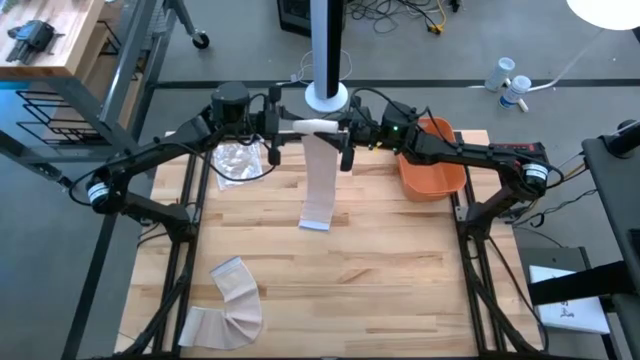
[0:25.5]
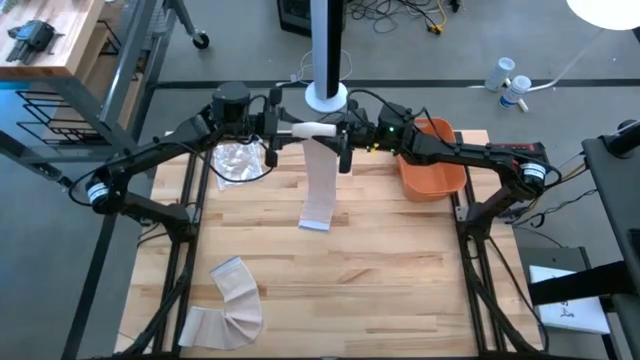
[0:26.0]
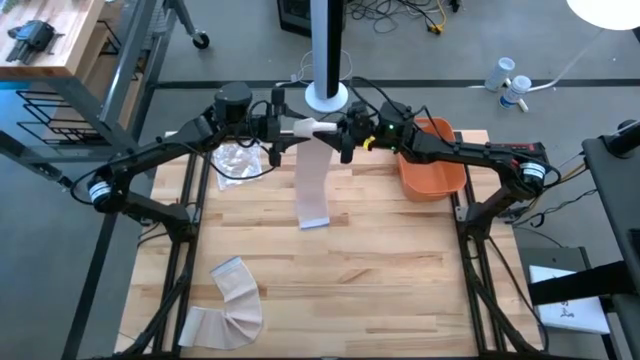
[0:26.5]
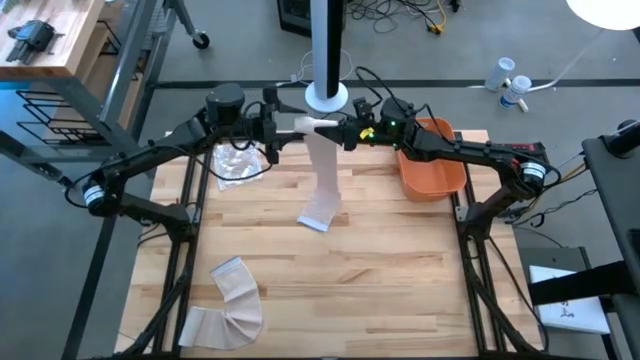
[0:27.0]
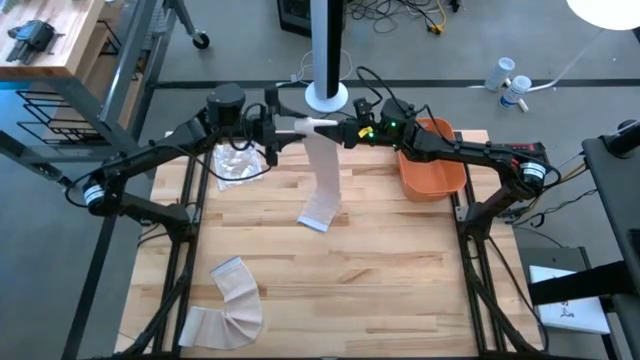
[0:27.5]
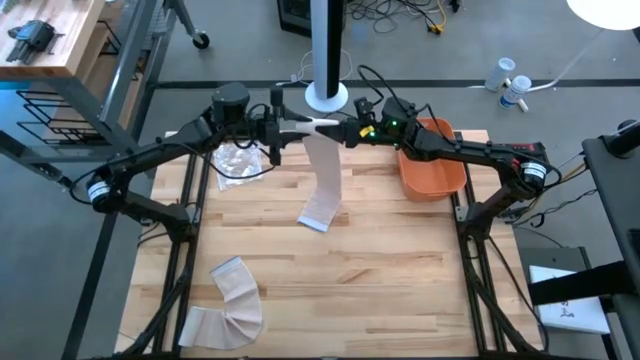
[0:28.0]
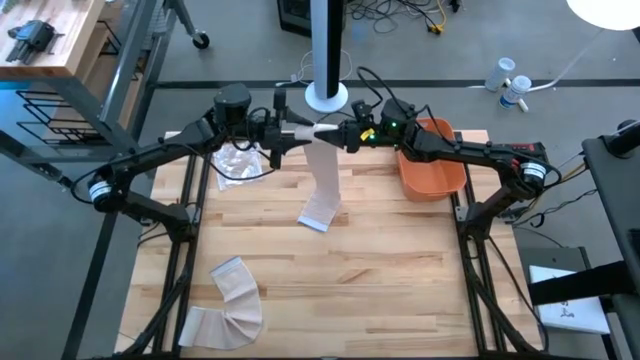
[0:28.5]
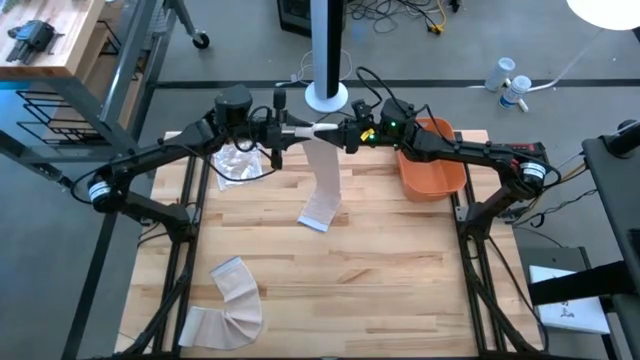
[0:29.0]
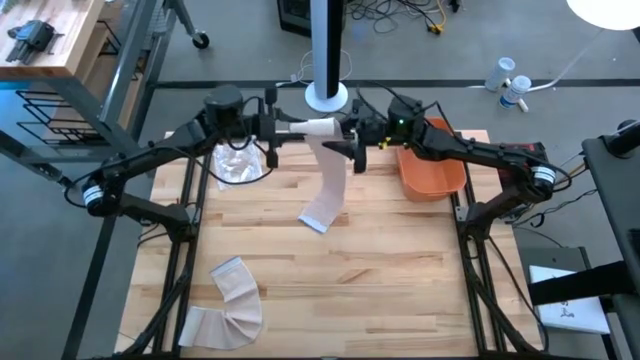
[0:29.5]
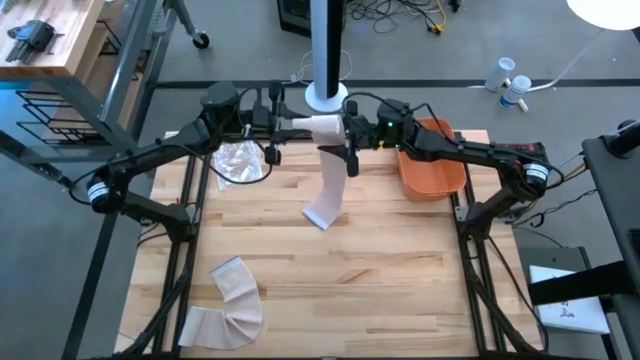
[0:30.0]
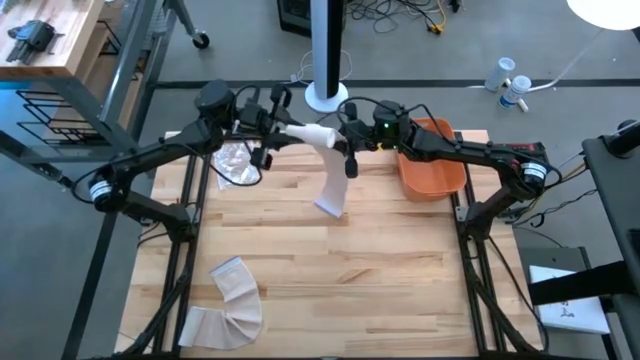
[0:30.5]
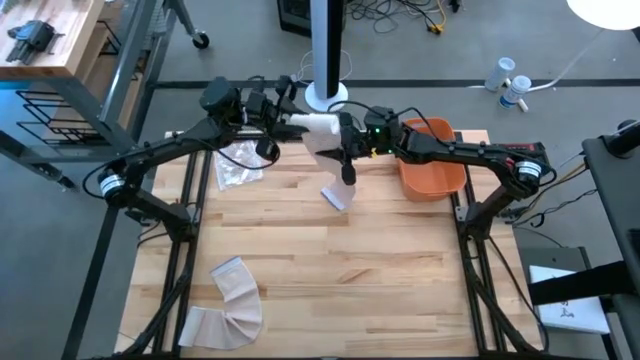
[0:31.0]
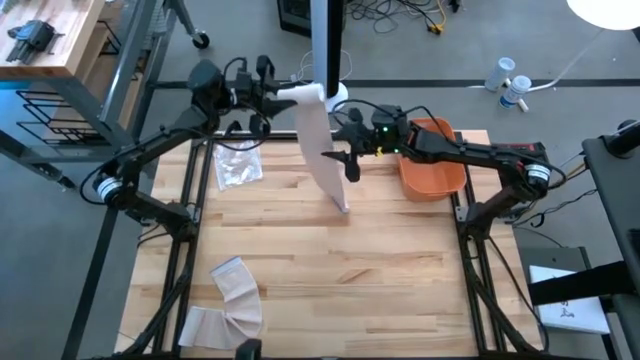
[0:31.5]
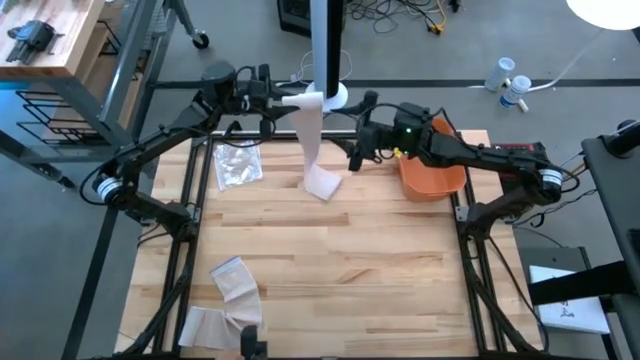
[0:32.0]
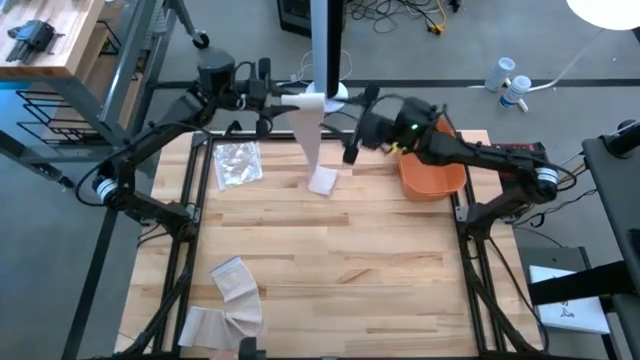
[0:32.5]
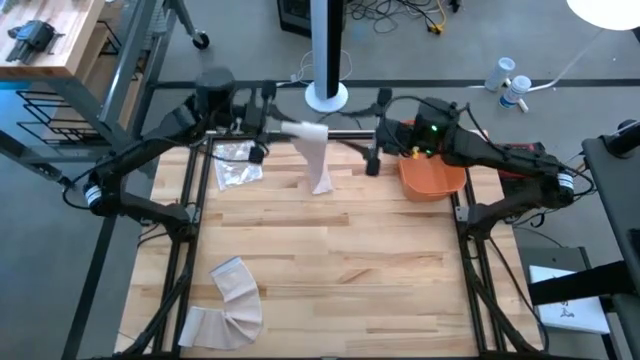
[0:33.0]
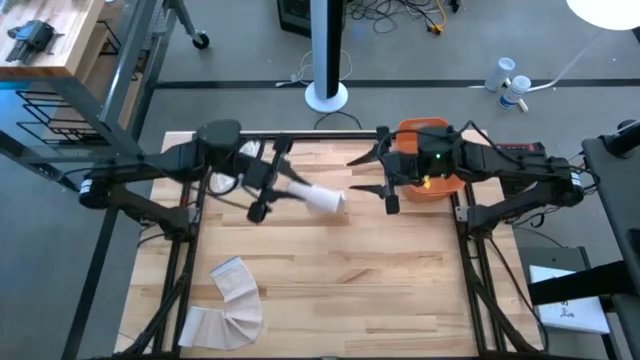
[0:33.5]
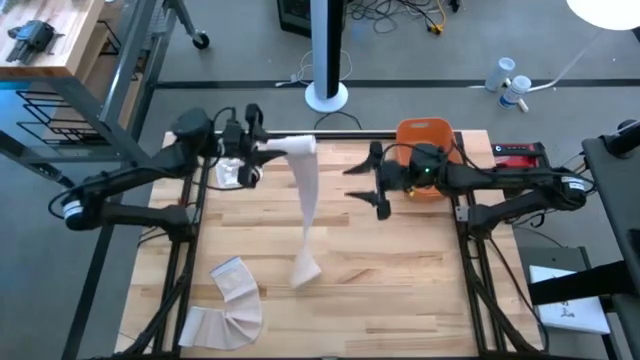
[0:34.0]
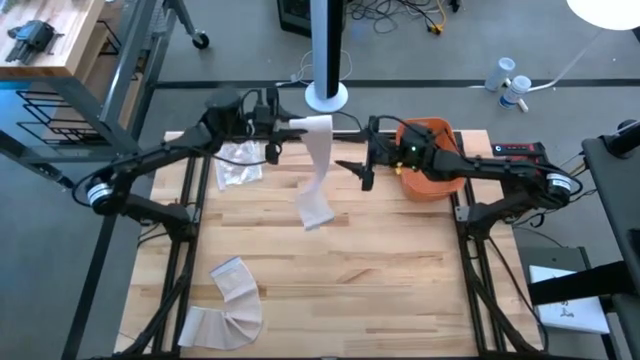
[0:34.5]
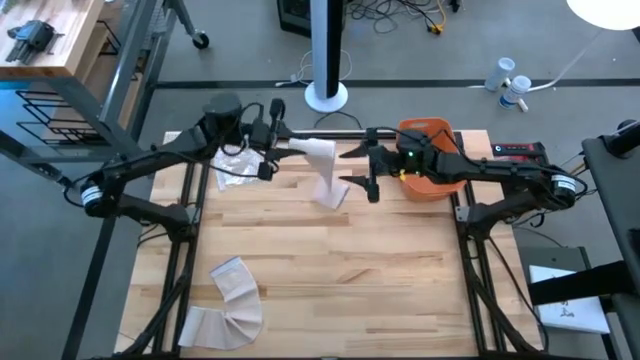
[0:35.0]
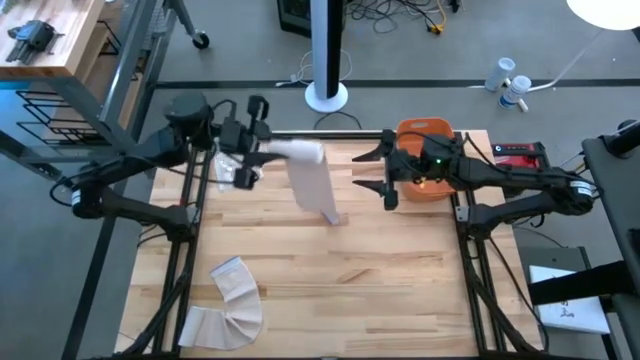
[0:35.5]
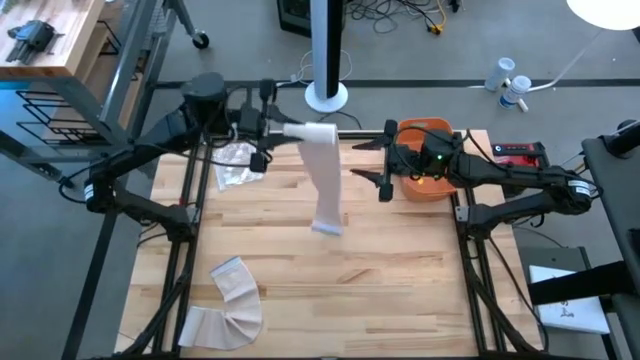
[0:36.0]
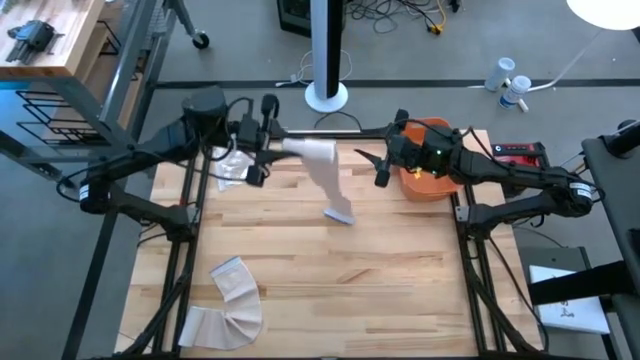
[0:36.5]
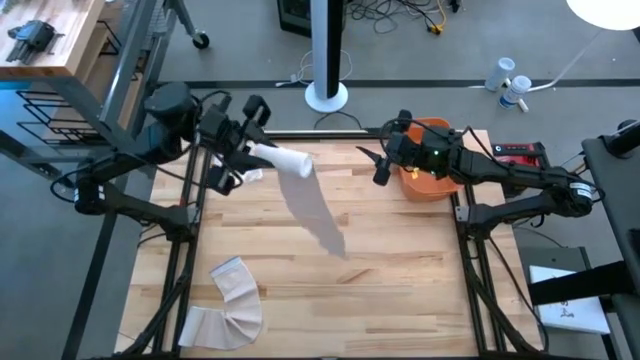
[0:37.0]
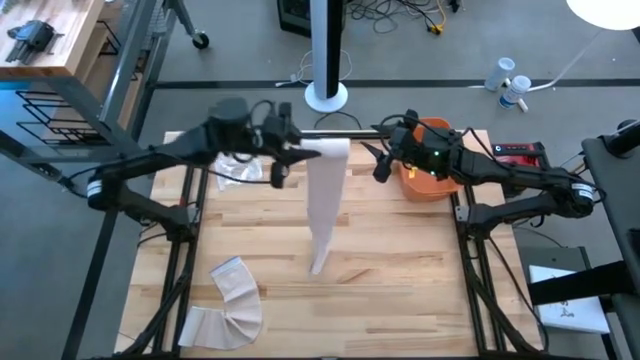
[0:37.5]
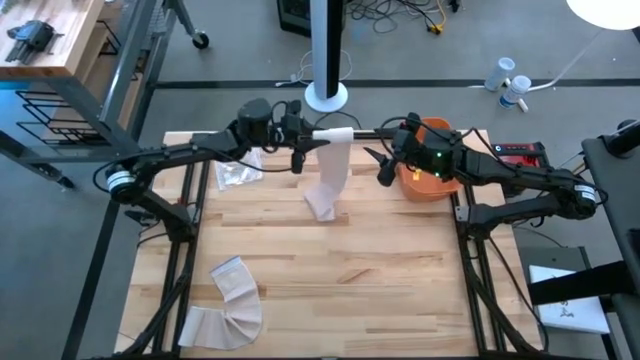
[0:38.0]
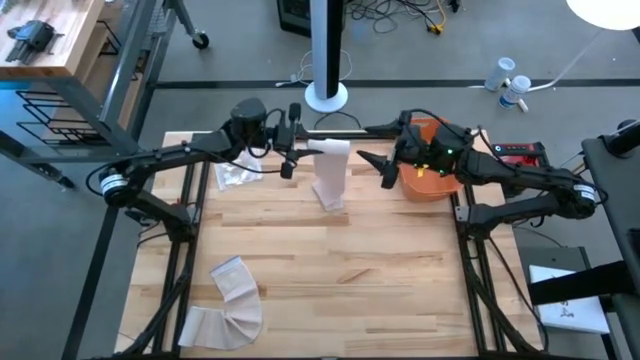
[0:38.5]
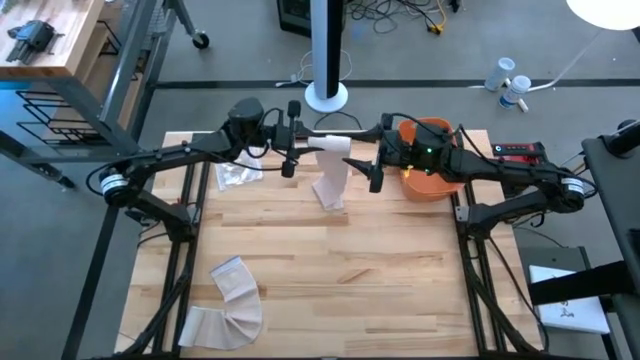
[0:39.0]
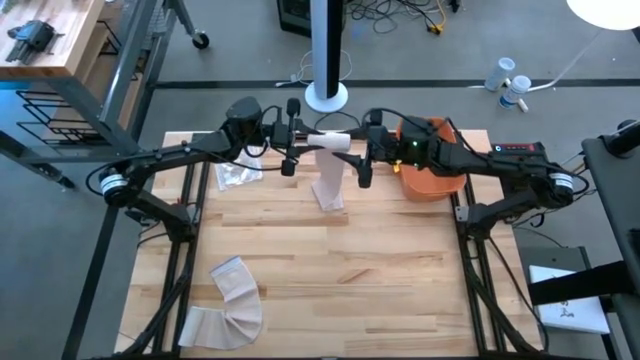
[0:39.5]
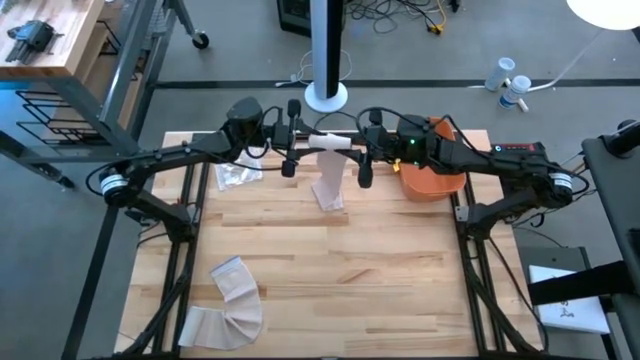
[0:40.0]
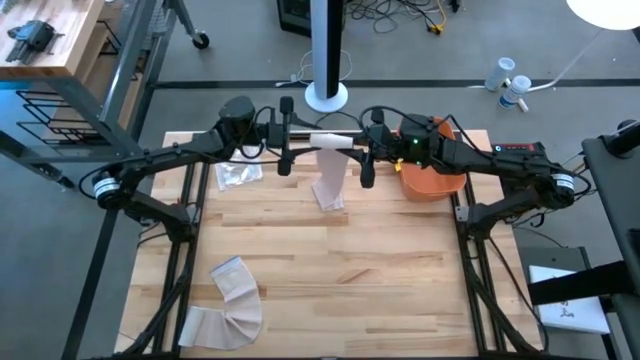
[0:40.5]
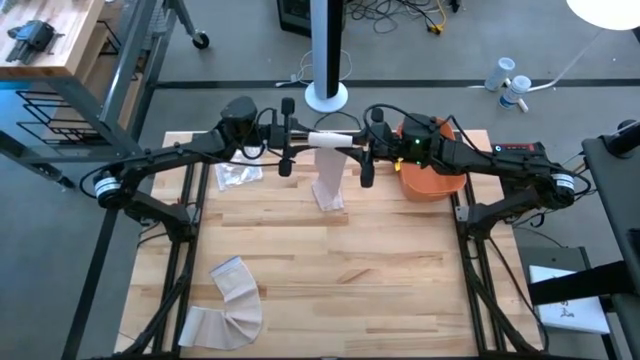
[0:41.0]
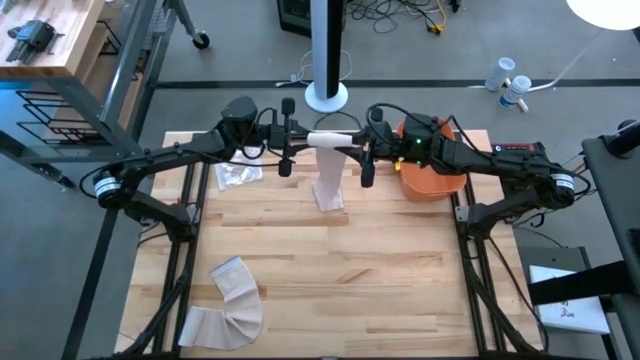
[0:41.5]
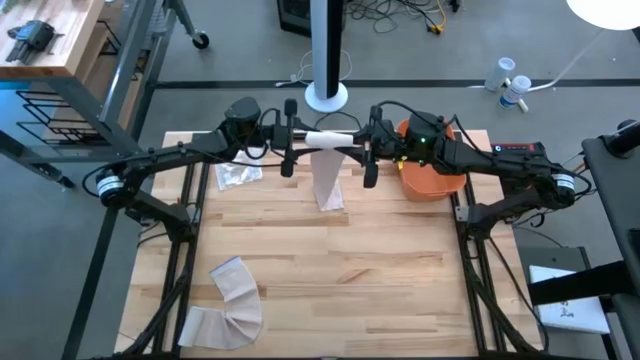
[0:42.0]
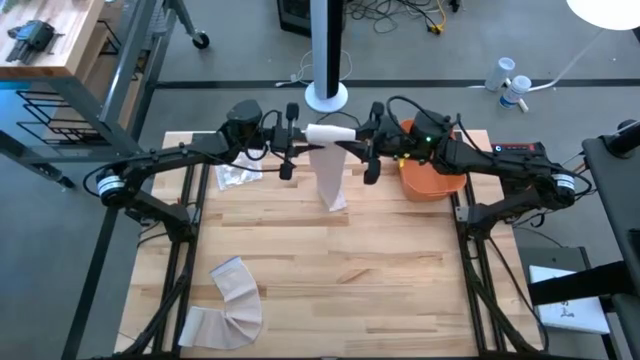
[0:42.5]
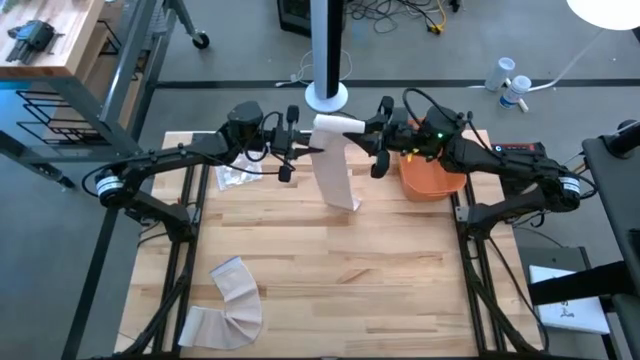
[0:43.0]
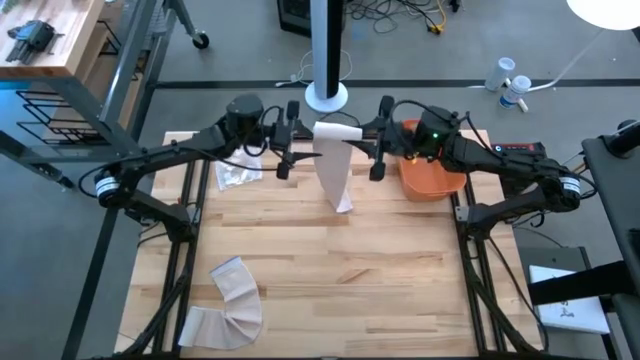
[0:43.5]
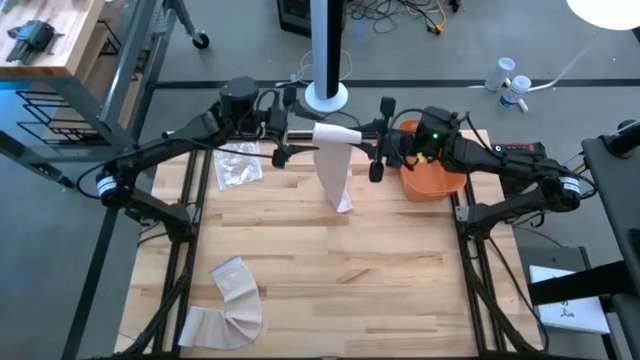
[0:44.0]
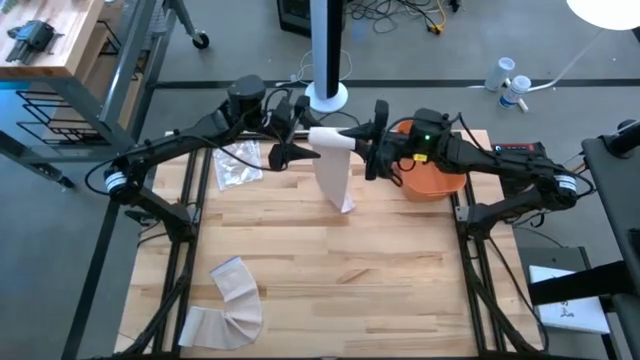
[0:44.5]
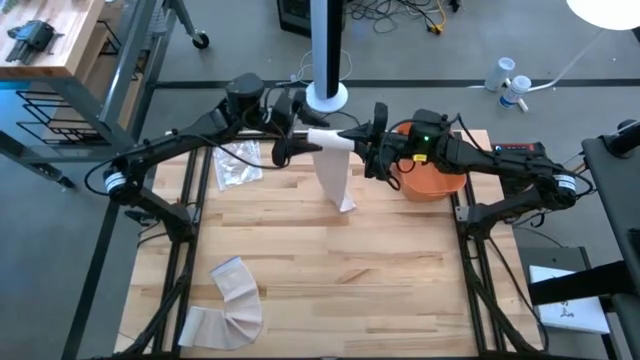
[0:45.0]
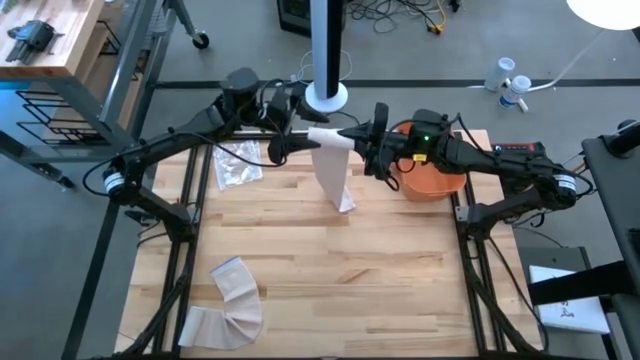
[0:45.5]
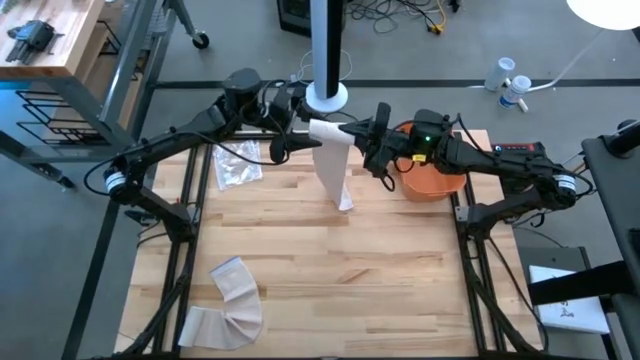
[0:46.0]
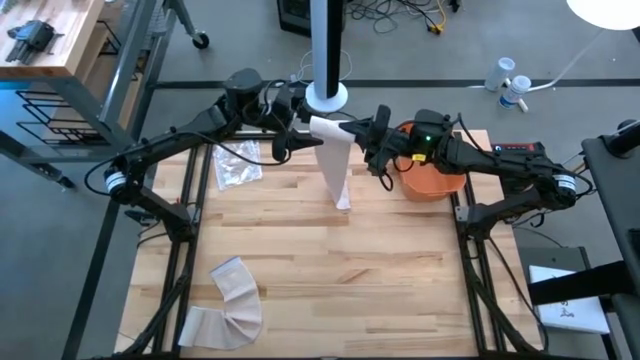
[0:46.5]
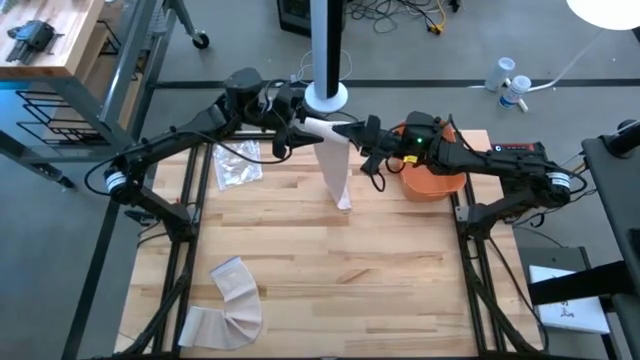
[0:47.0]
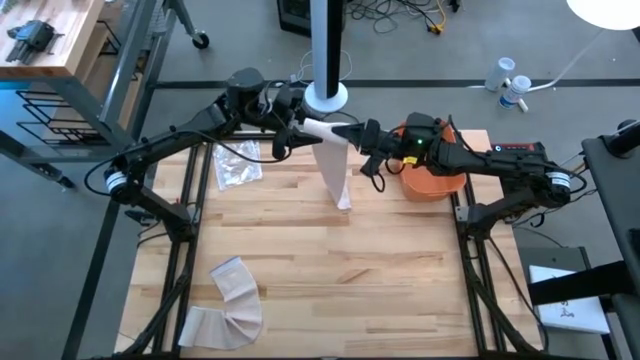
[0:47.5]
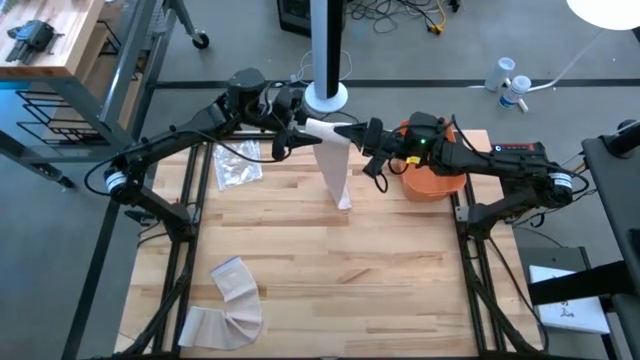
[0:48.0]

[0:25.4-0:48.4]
Task: Roll bandage
Roll the center brown bandage
